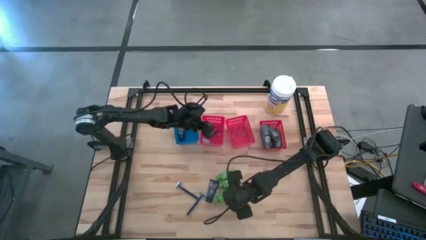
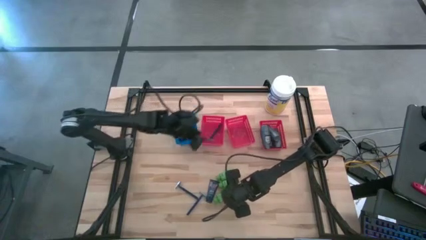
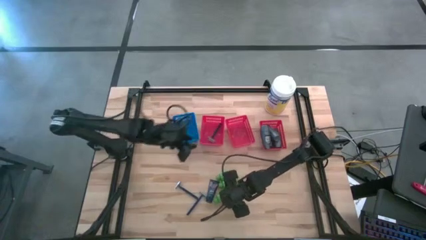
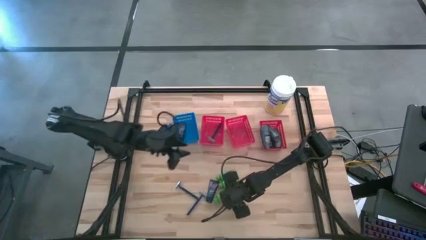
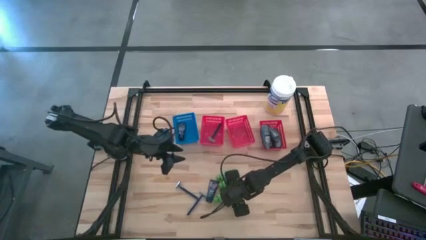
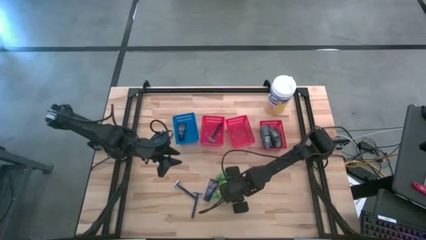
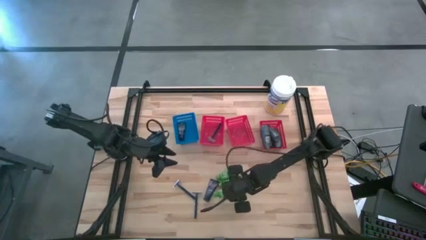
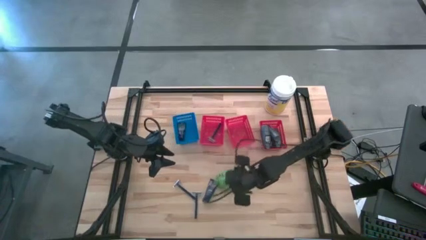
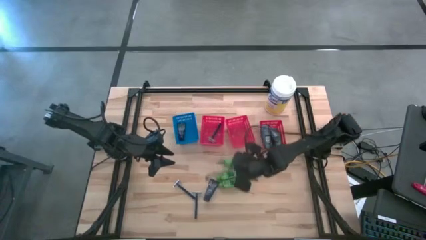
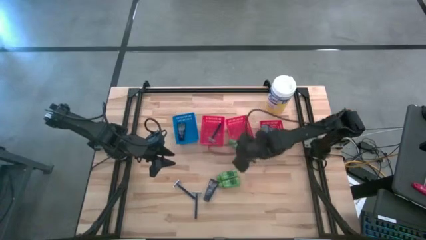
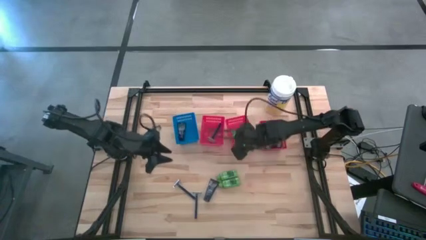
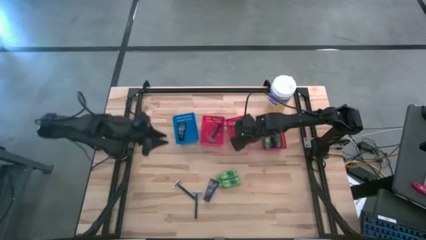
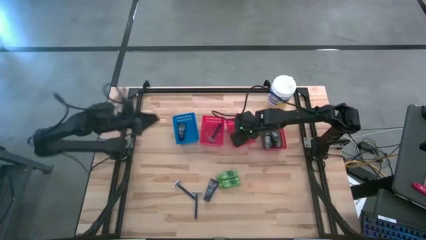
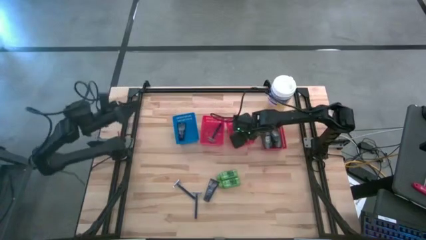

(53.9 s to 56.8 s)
Task: Pick & Place Travel size toiletries
Put the shampoo into the middle red bin

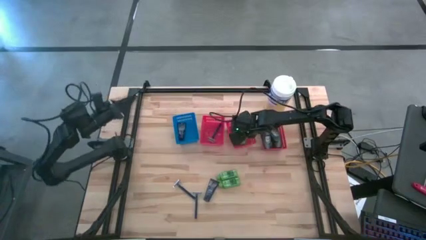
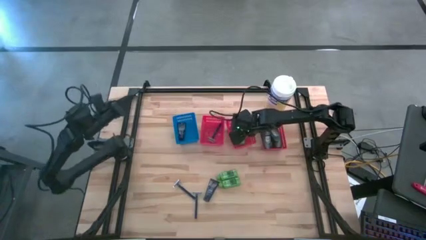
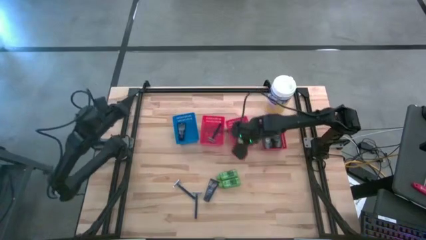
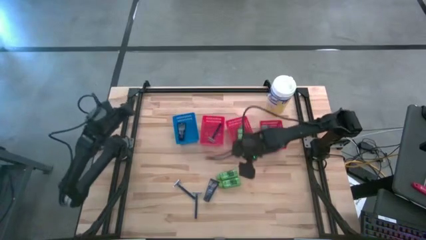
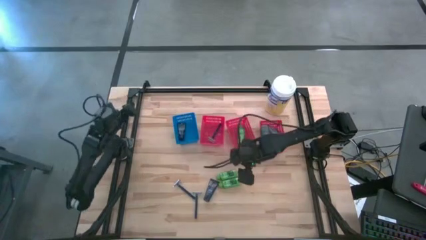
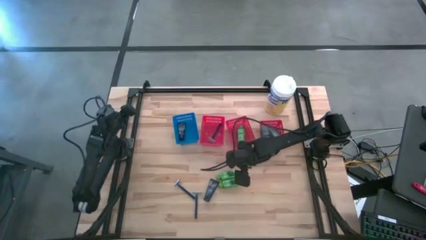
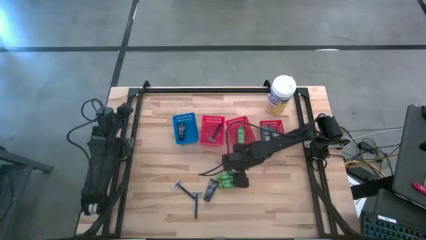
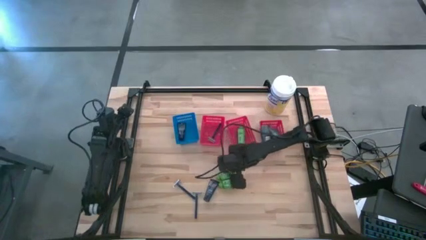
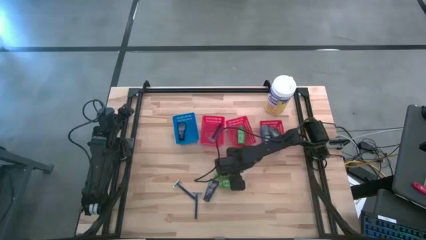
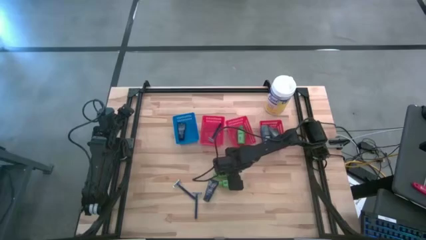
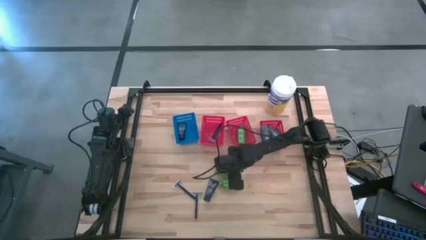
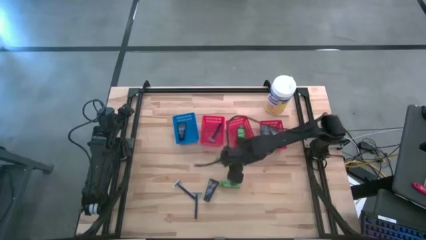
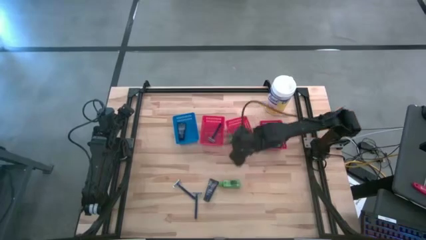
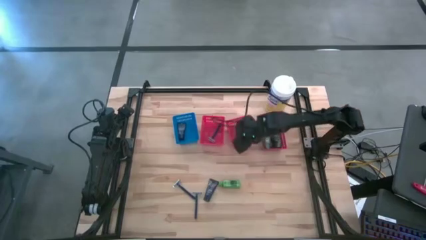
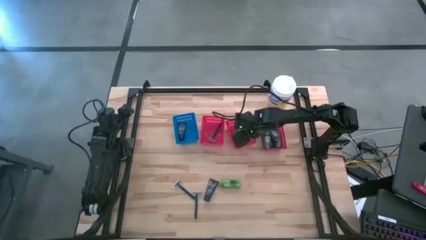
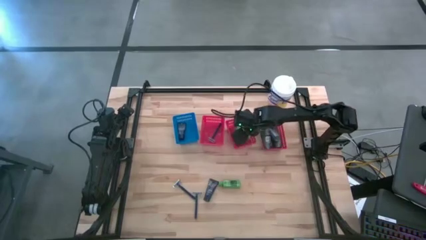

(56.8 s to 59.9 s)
Put the shampoo into the middle red bin

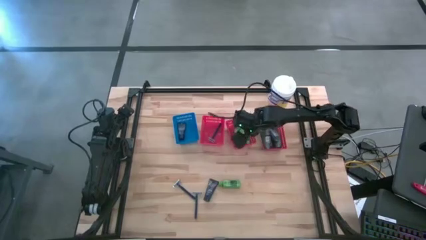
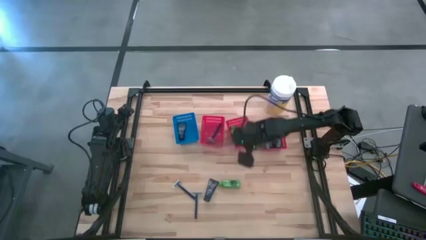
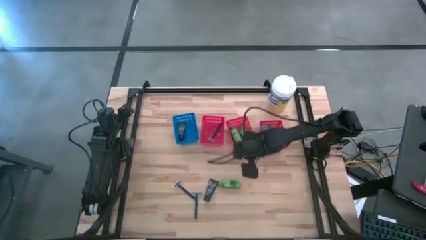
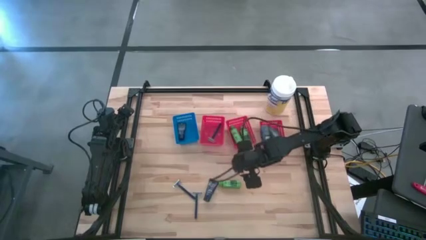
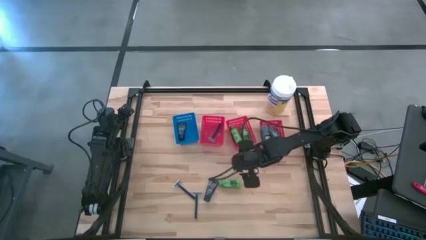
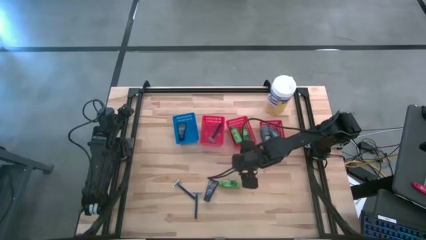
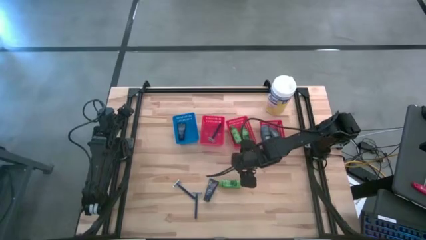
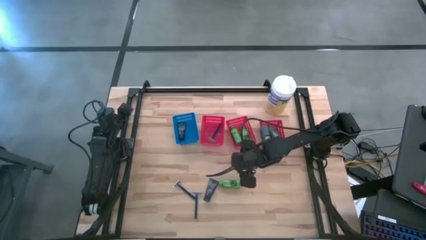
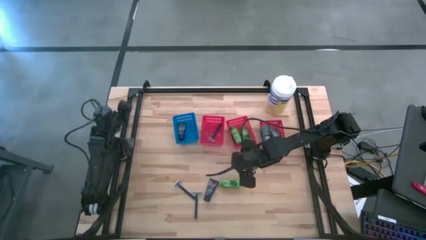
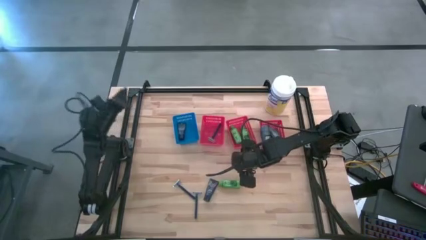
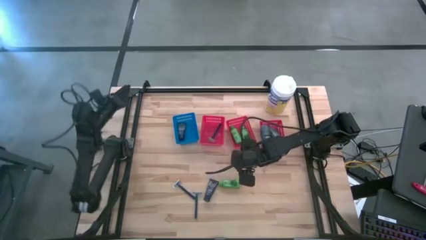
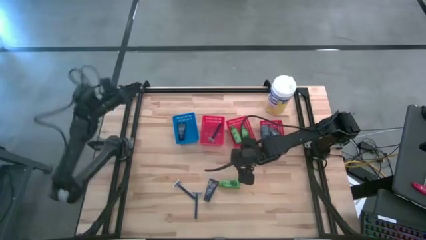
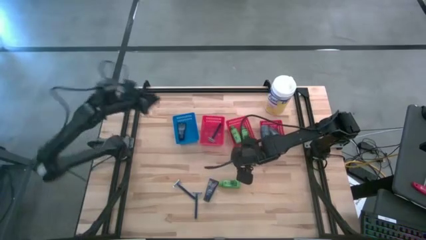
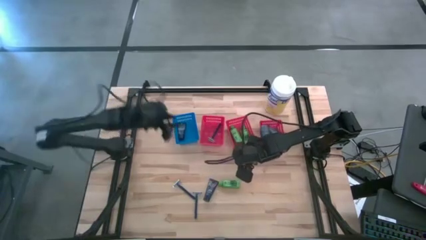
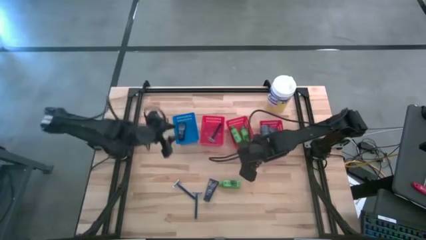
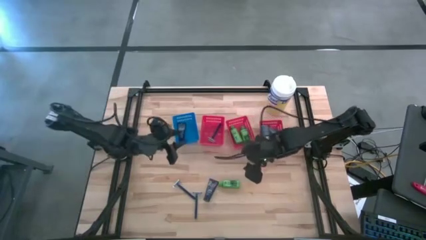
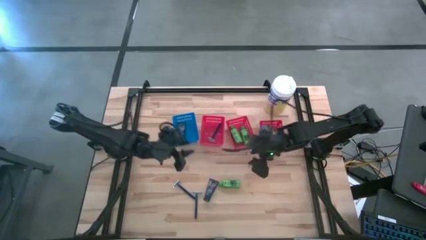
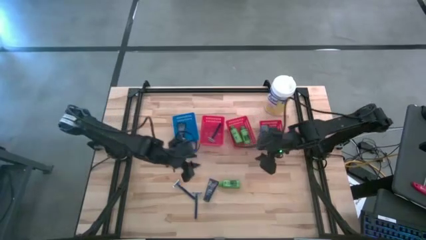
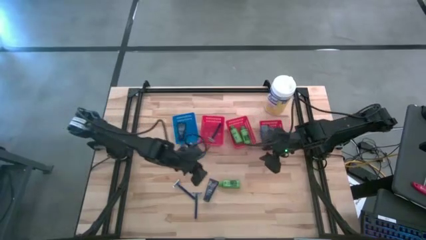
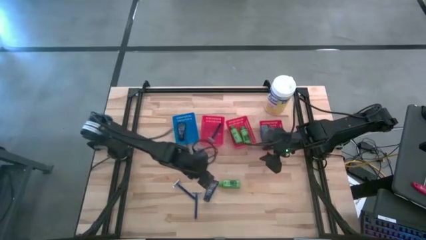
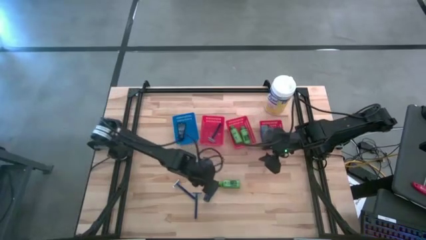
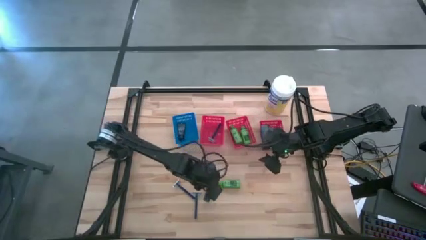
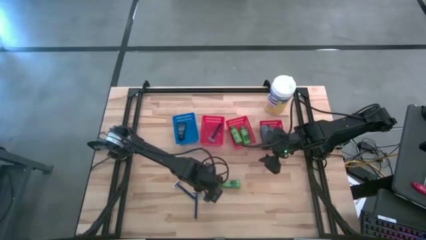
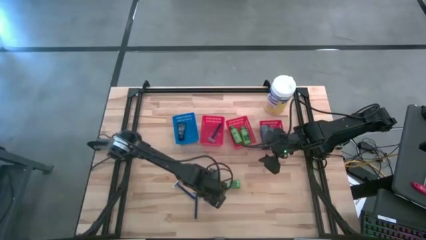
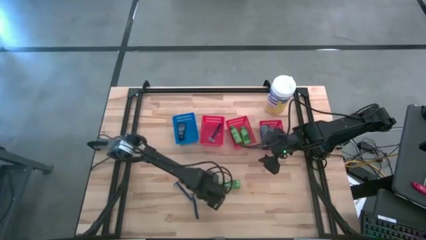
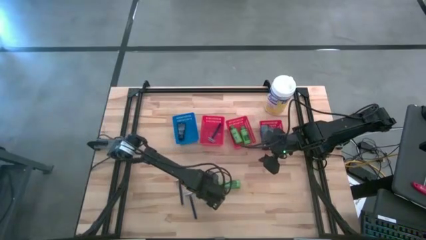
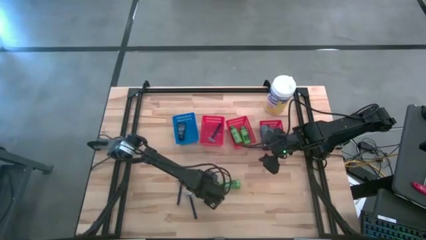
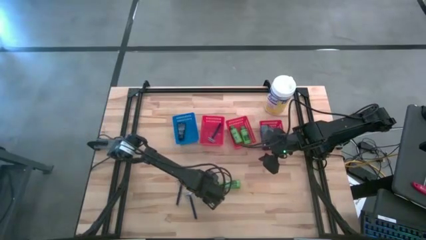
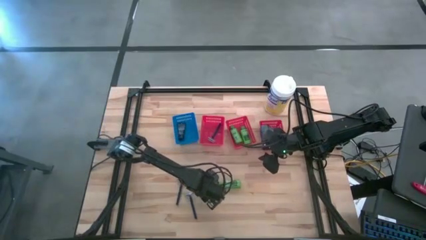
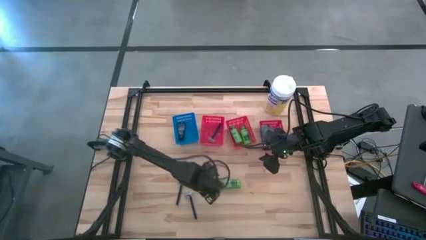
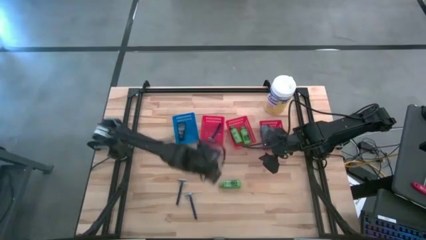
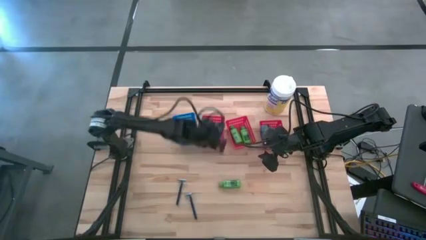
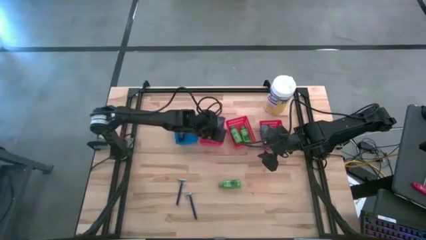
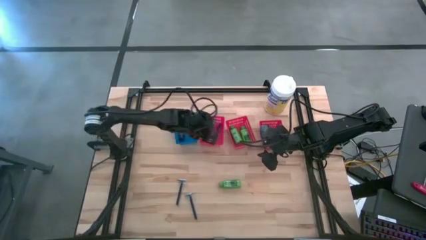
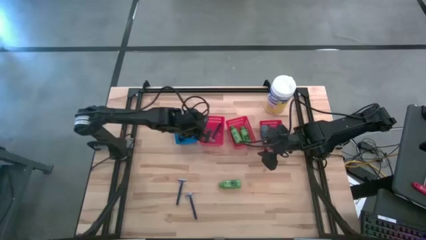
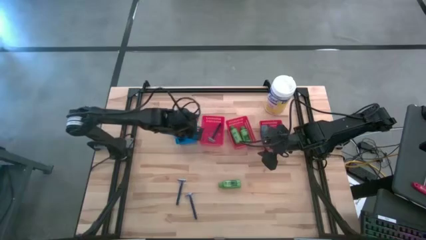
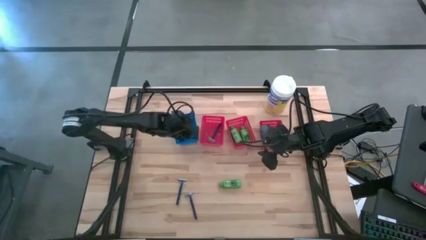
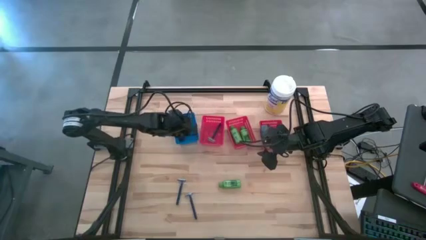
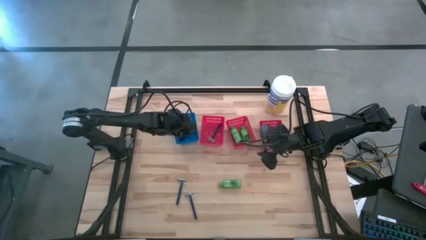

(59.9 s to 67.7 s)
Put the shave cream into the blue bin

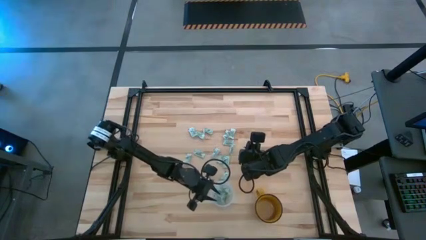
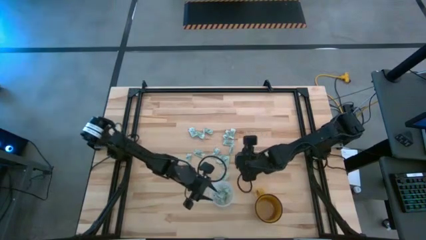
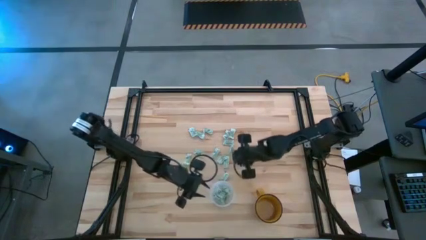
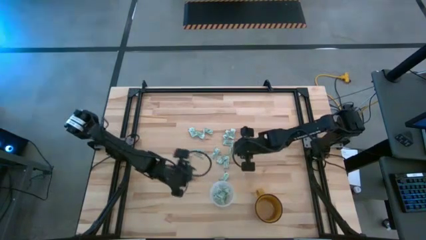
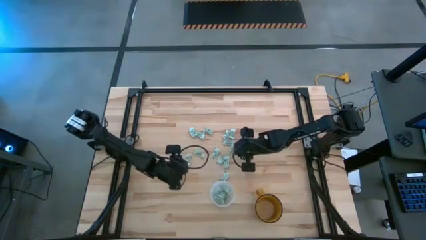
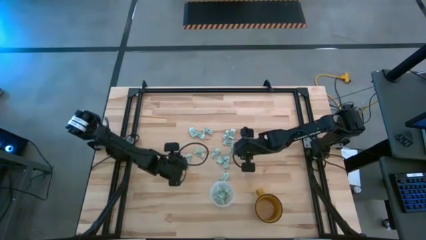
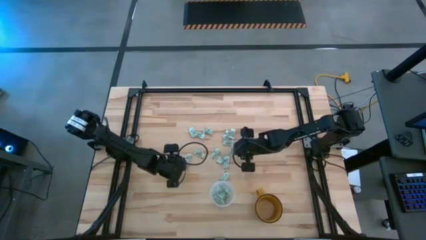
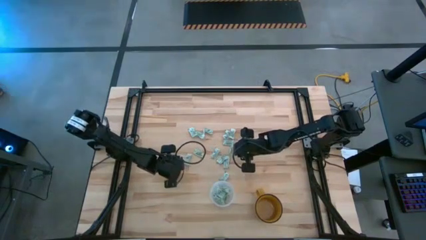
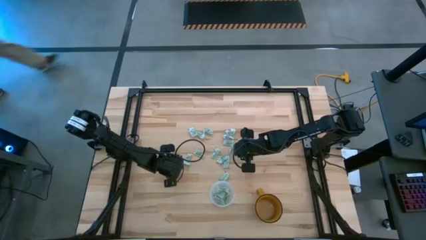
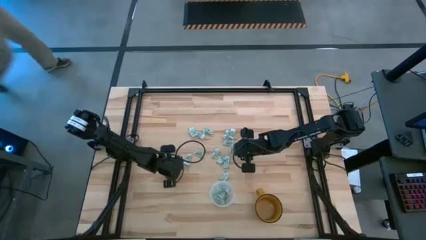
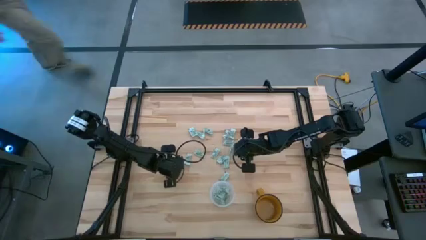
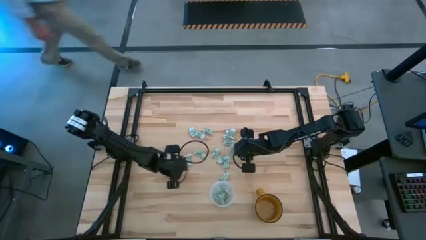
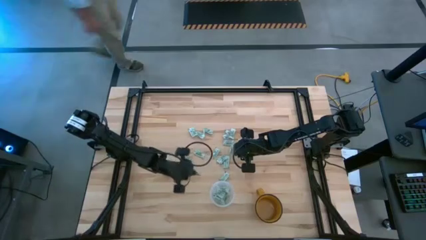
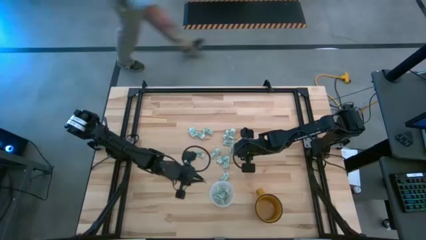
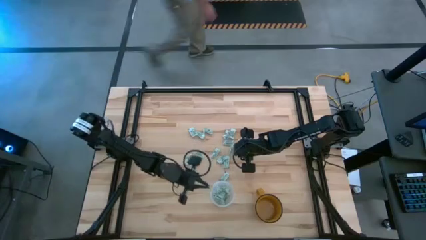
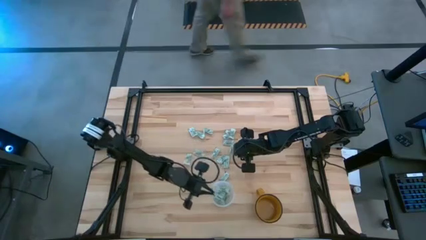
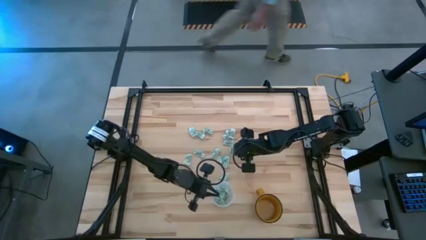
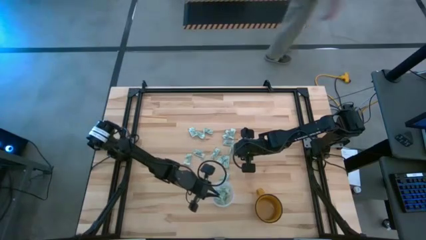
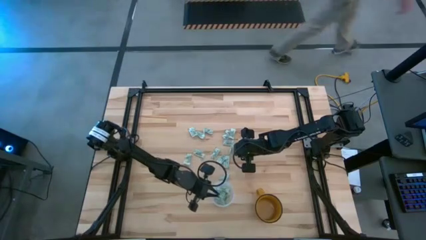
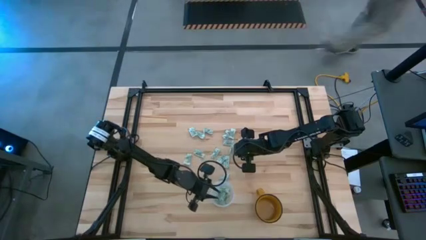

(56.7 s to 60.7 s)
Task: Pick and place Stevia / Truvia into bins
Put the stevia packet into the transparent bin
